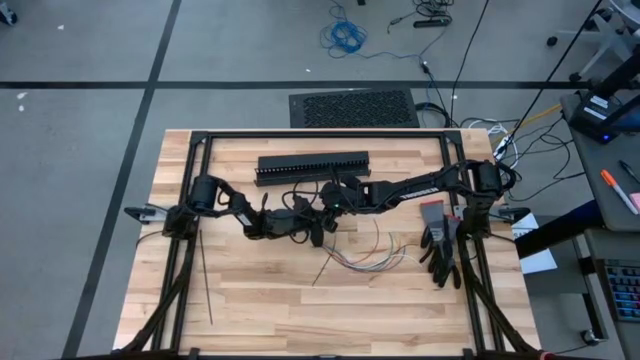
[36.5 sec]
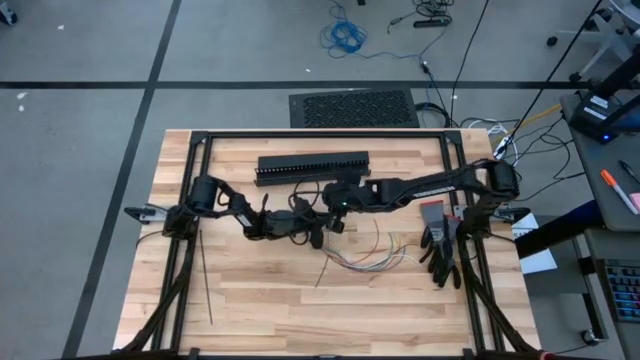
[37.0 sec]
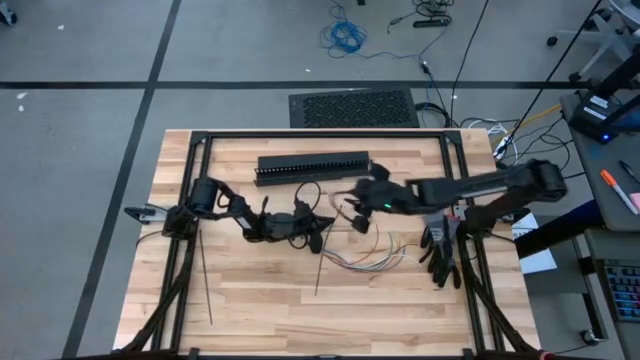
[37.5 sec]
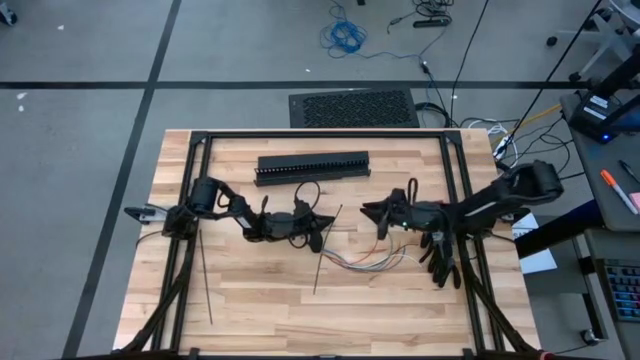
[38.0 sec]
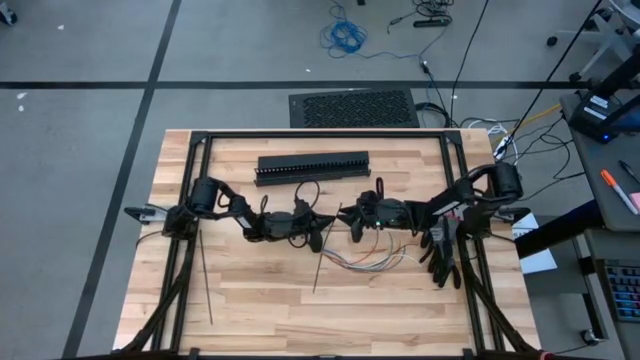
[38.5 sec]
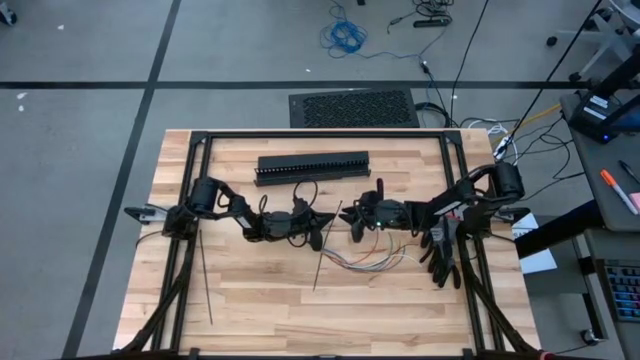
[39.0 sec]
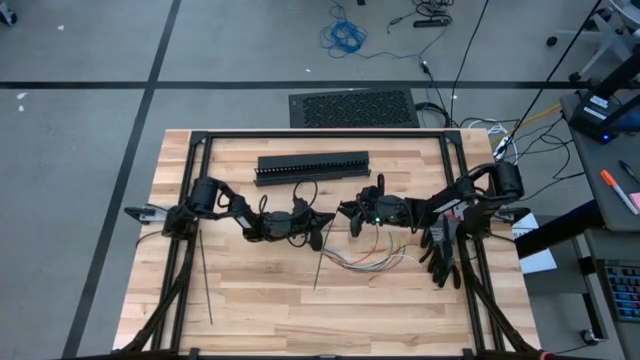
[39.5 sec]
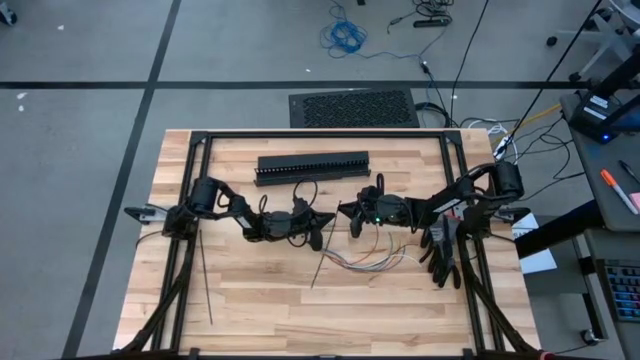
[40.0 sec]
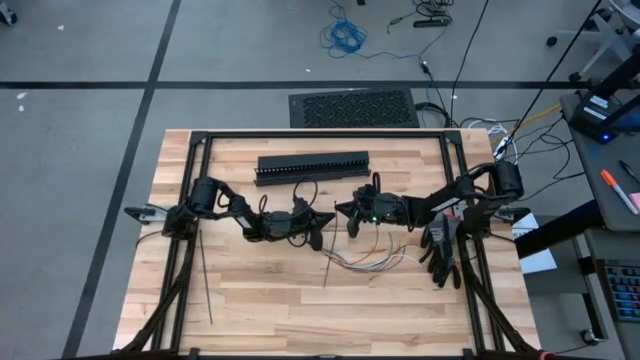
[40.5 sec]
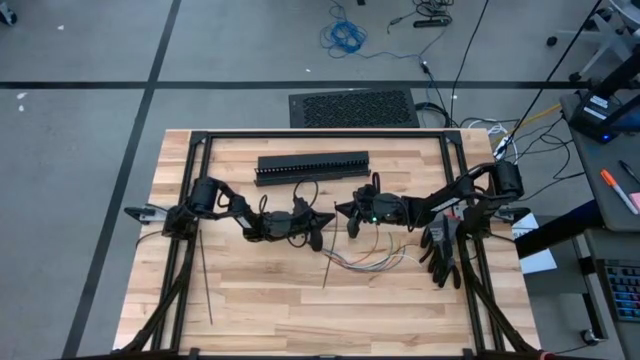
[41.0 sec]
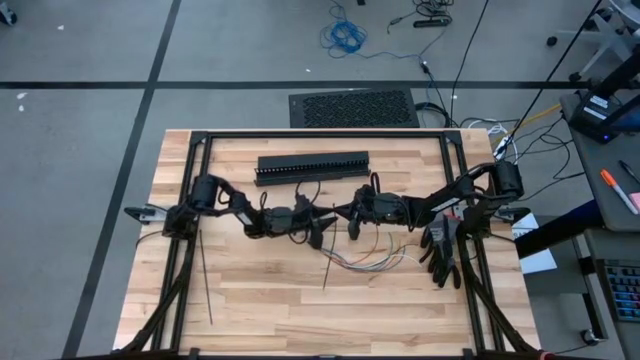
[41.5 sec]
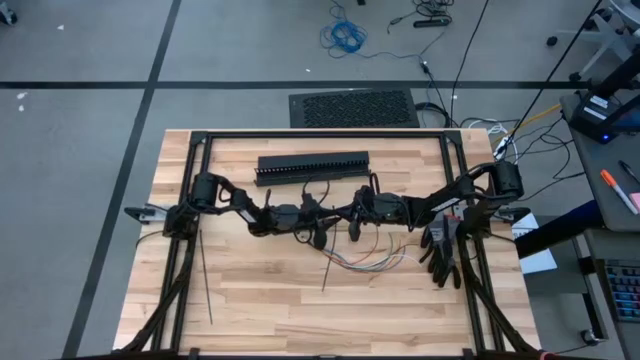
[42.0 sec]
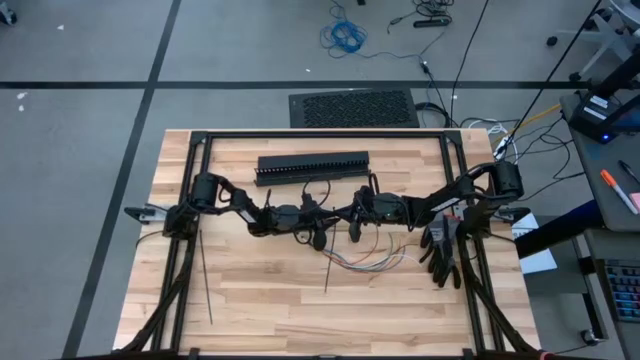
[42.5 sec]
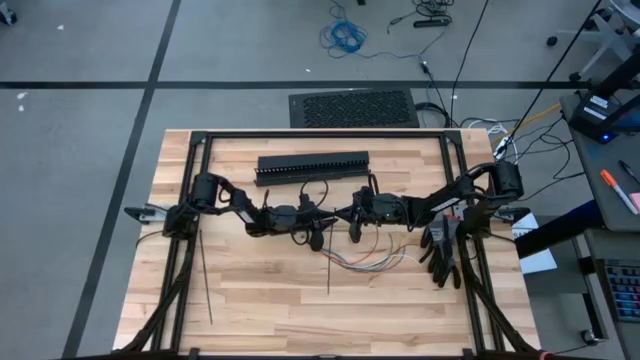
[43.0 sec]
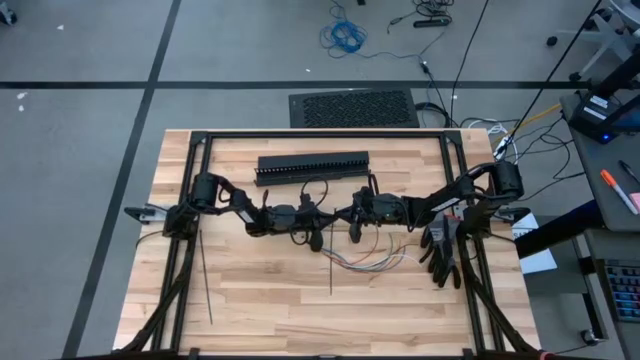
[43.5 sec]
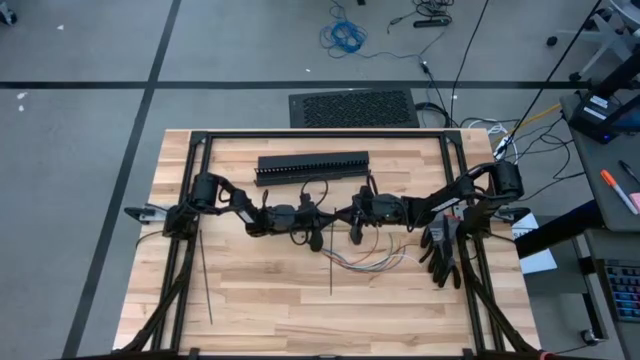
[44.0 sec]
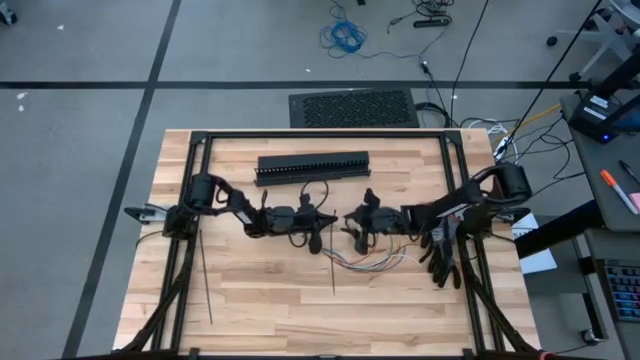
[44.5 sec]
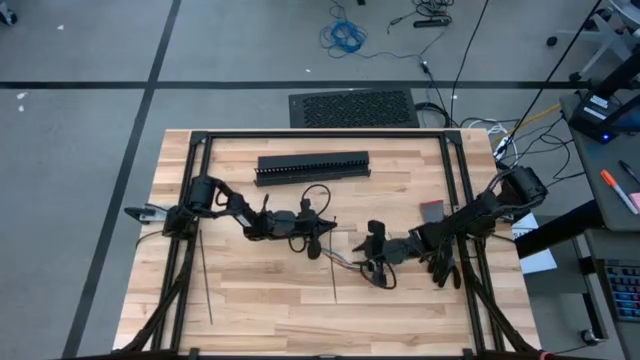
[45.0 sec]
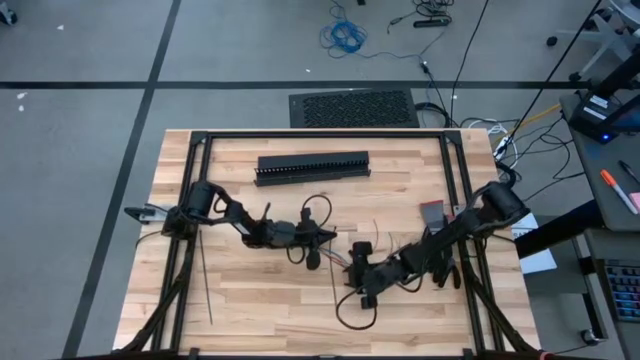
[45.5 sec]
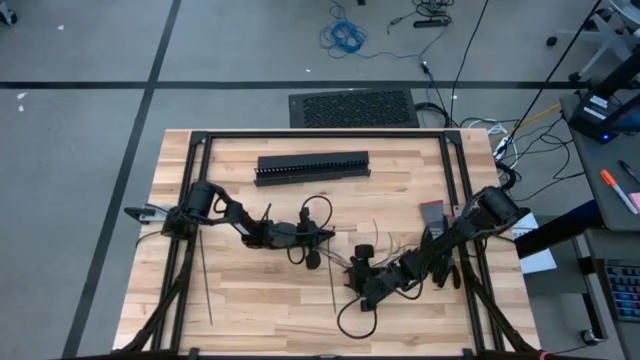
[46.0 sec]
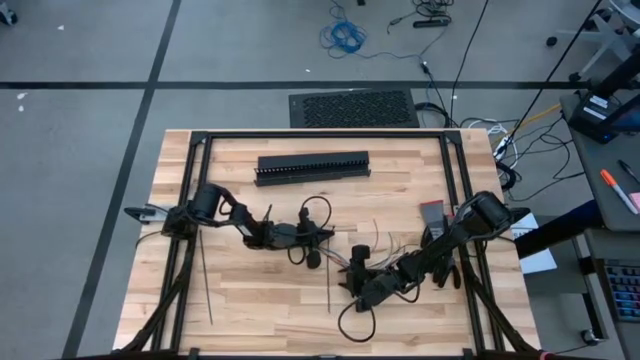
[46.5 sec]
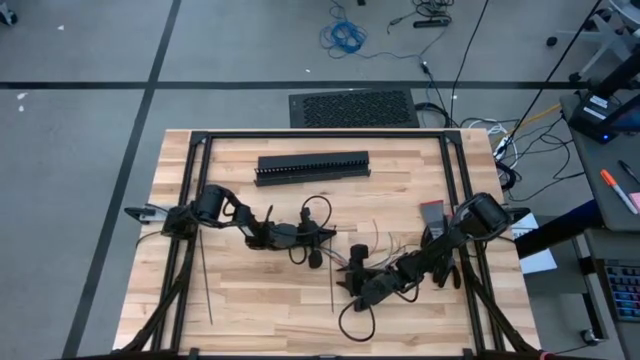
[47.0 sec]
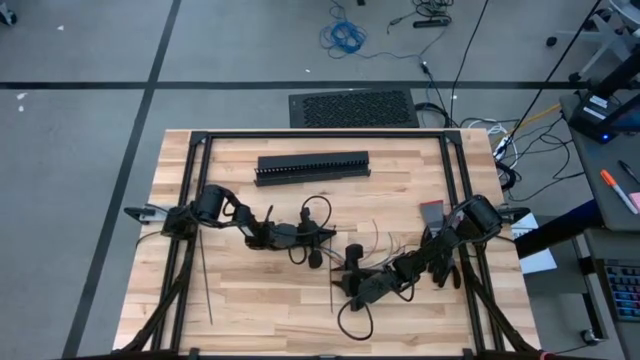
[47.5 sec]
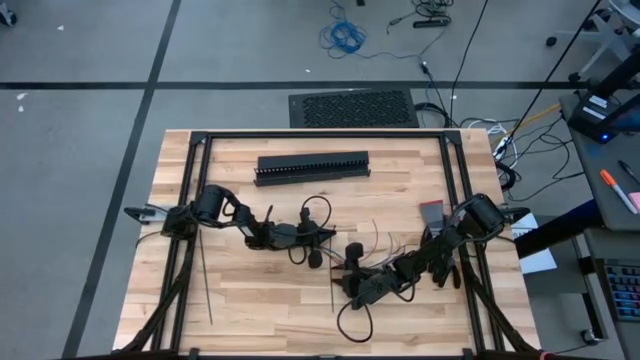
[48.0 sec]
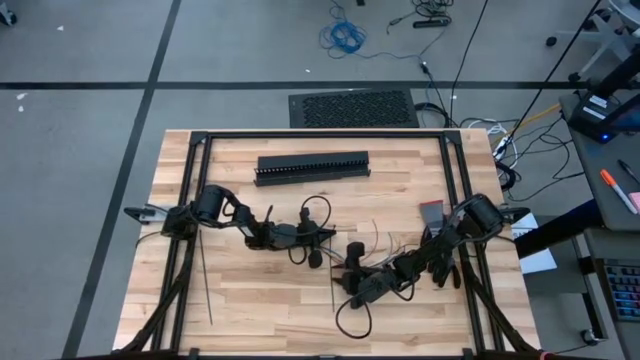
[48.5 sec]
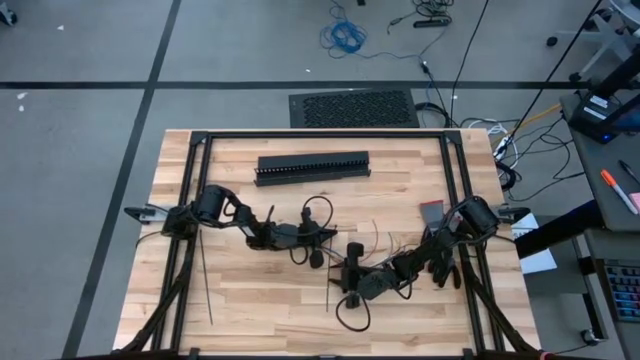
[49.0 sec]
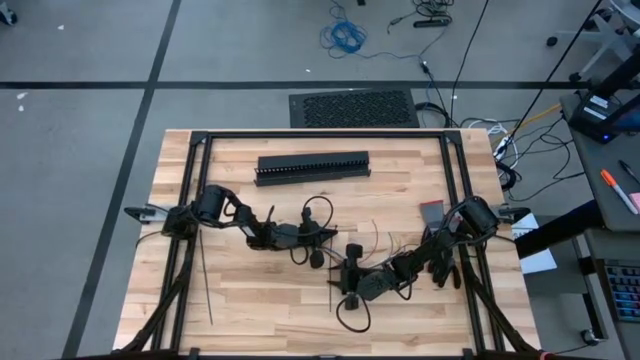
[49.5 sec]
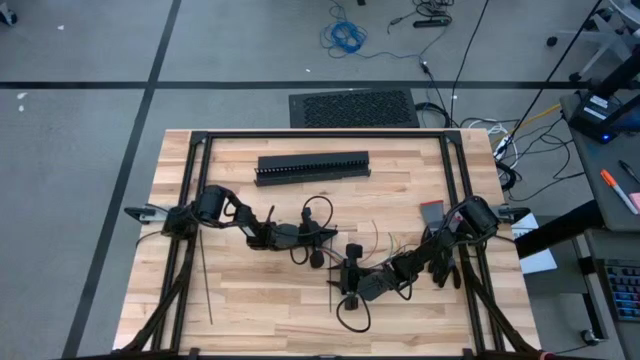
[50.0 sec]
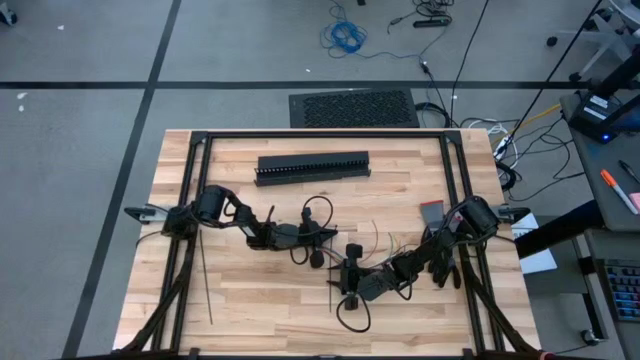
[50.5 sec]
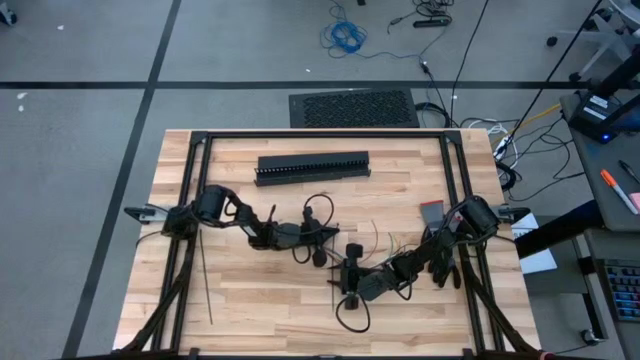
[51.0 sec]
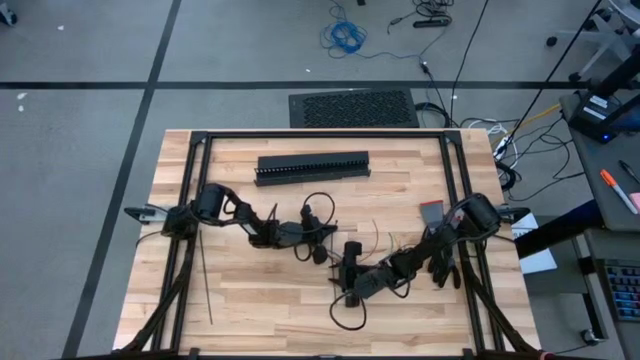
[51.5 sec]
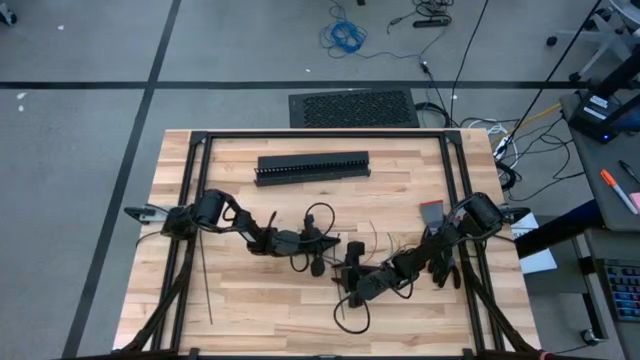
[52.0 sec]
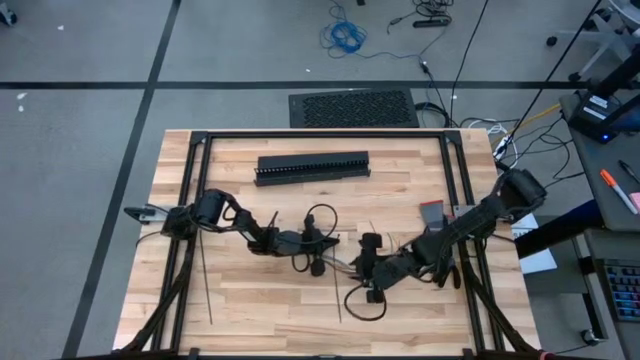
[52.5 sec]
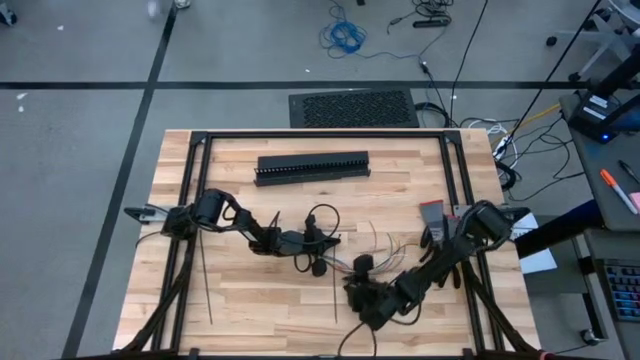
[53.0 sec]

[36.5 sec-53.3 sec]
Task: Ziptie cables
Wrap the cable wires with the black zip tie
